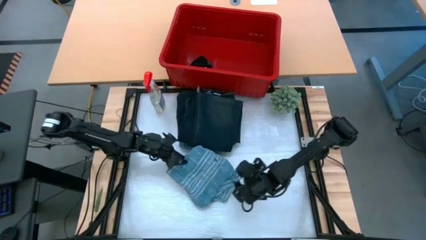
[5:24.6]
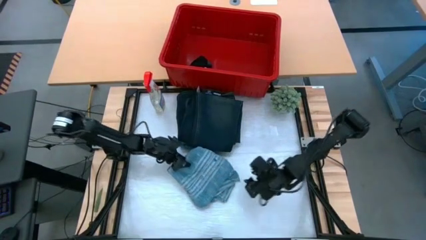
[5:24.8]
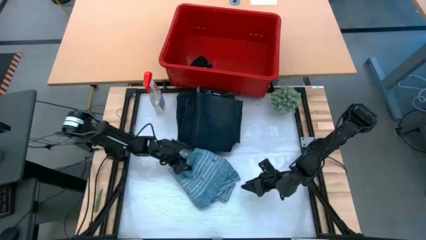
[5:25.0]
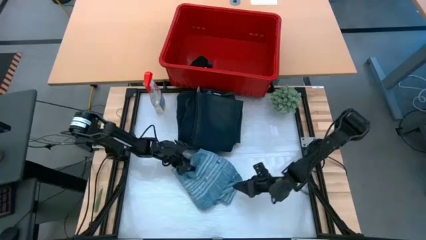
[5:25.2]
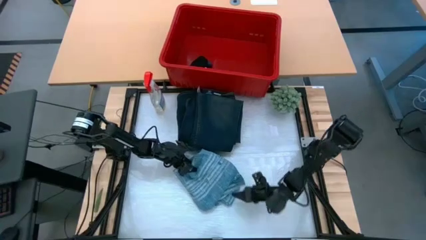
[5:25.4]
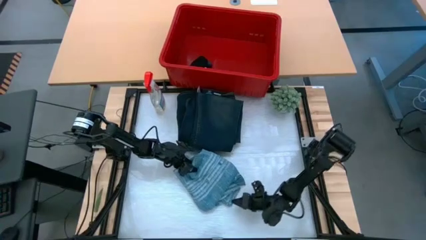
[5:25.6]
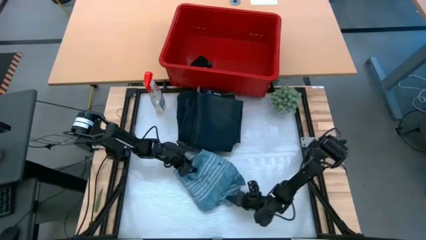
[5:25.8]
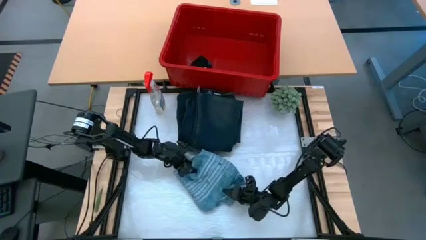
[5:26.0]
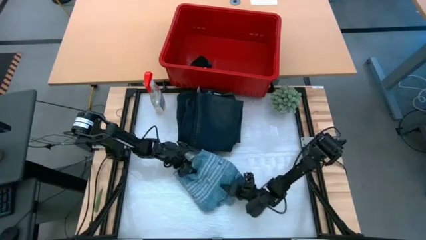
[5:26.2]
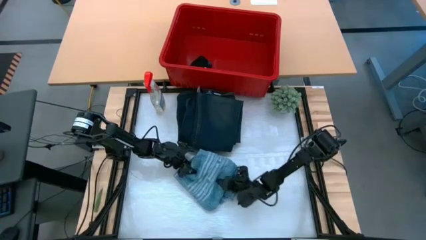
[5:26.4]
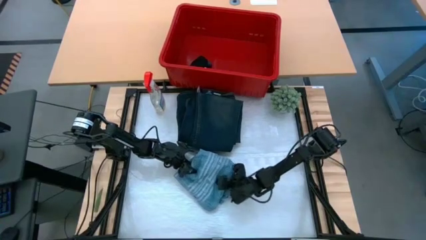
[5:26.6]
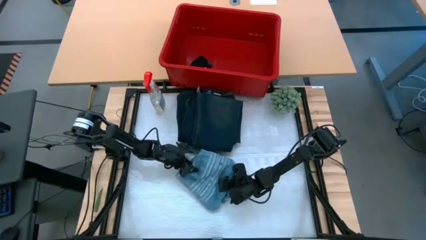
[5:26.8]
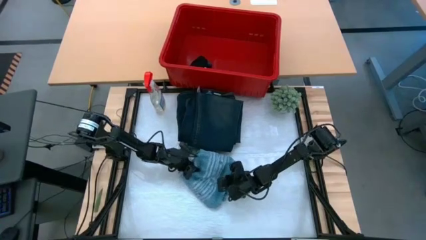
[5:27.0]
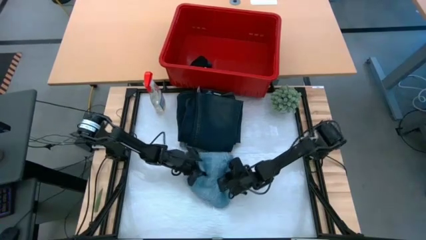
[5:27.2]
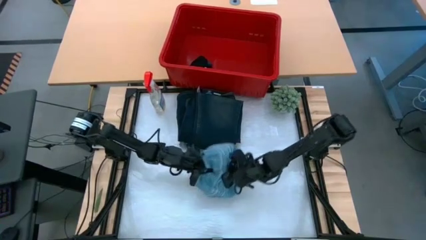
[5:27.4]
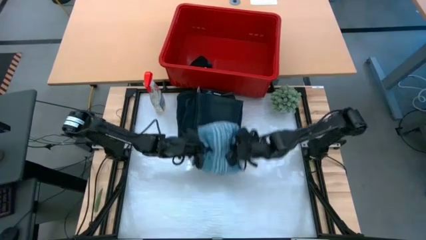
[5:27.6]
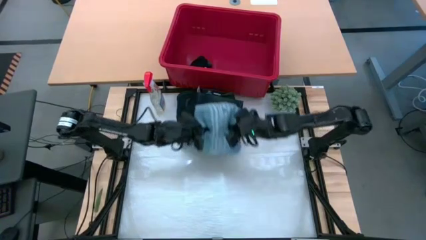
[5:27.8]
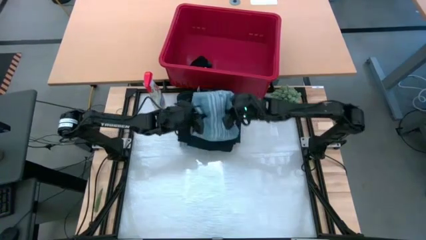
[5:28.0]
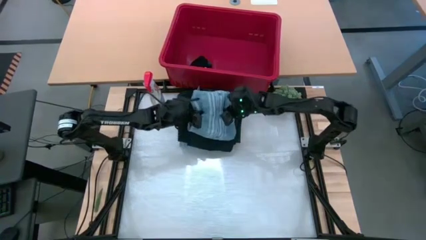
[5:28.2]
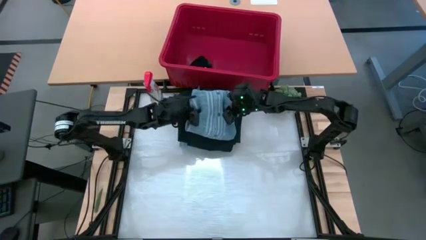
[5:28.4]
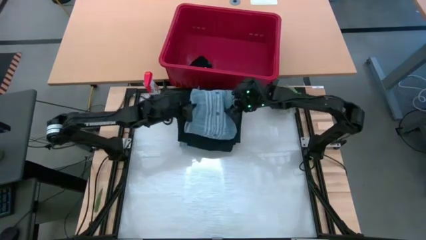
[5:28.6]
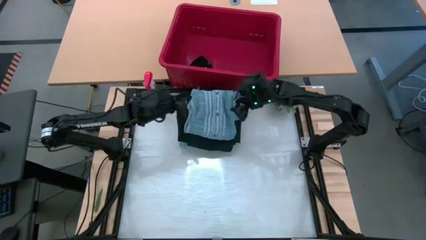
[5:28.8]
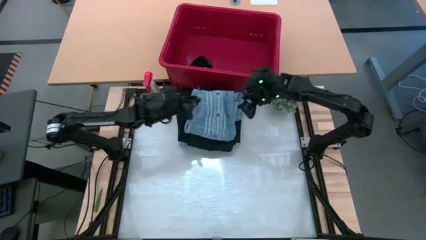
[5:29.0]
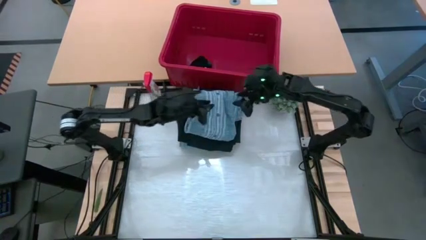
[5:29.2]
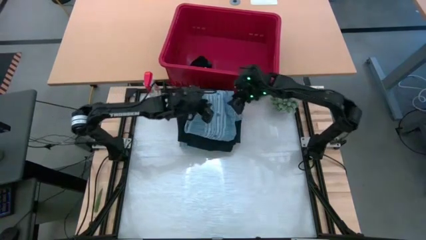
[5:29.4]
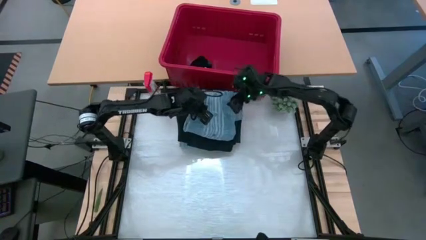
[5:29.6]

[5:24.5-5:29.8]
Task: Fold Laundry from Bin
Stack the blue long sleeve on top of the black jeans

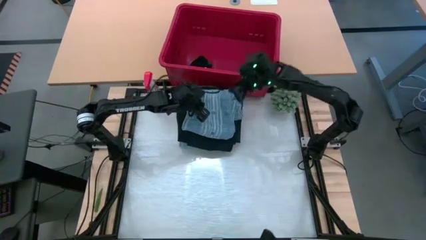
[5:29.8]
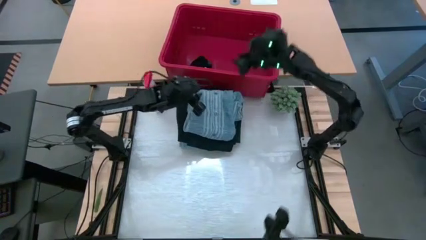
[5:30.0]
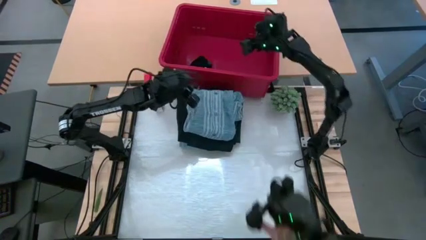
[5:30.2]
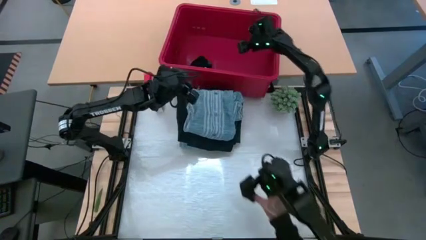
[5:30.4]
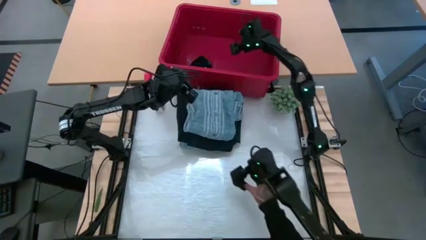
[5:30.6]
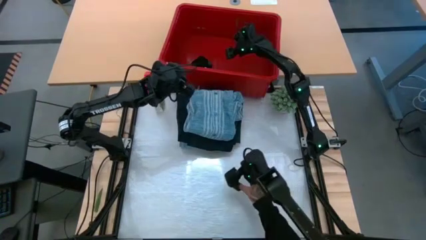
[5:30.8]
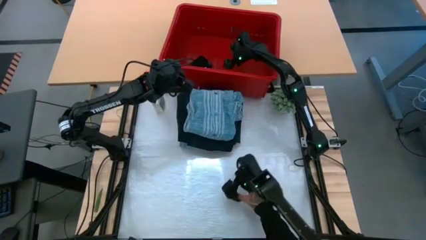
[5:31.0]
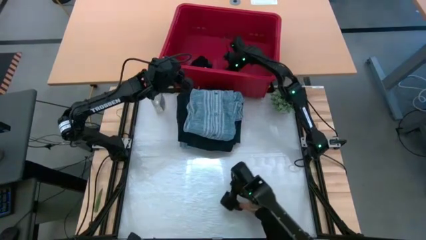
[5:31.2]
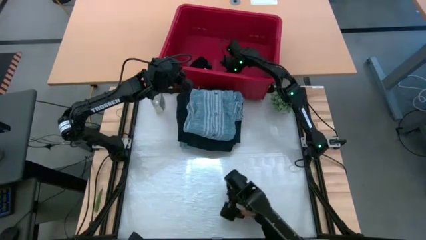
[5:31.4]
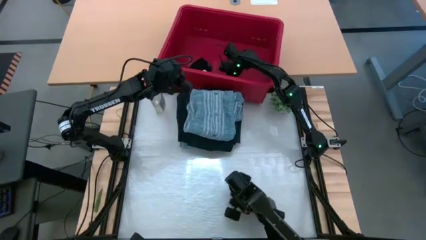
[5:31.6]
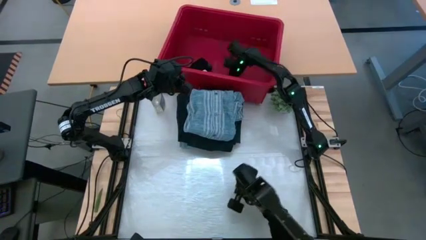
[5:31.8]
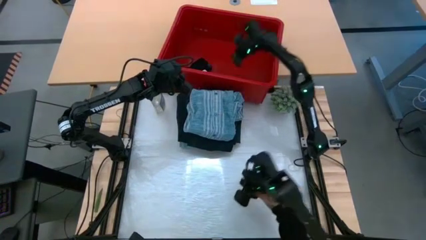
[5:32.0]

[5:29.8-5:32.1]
Fold the black underwear from the red laundry

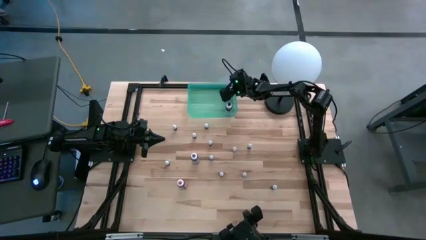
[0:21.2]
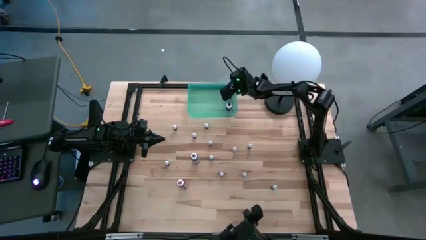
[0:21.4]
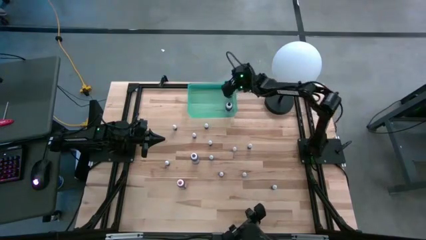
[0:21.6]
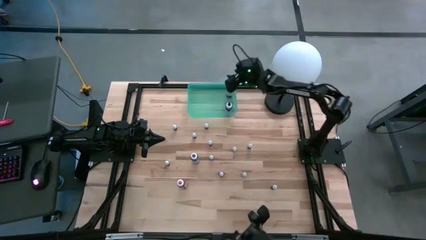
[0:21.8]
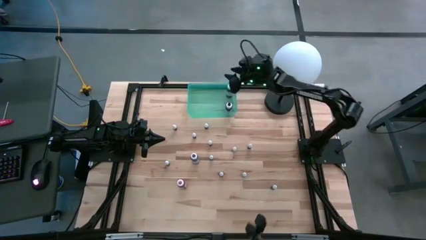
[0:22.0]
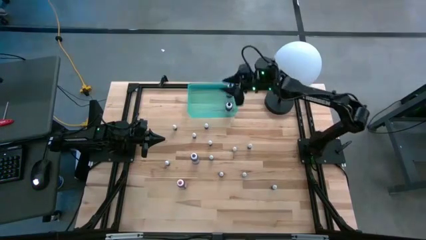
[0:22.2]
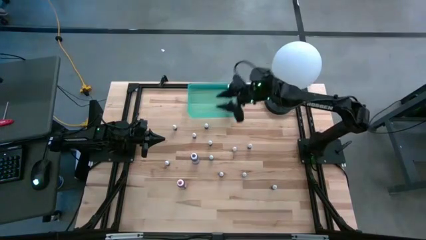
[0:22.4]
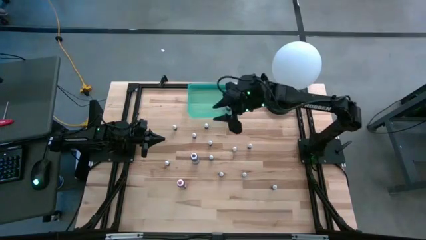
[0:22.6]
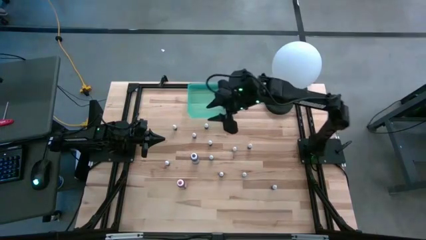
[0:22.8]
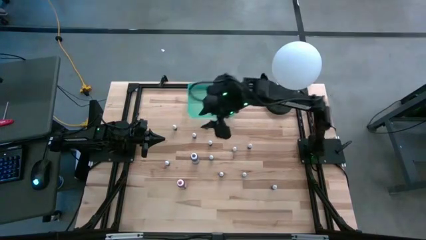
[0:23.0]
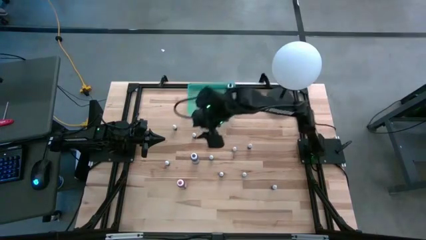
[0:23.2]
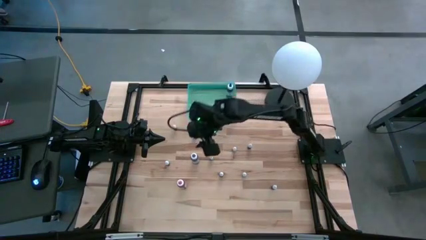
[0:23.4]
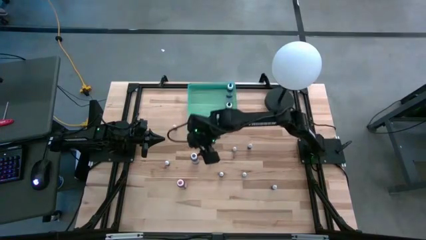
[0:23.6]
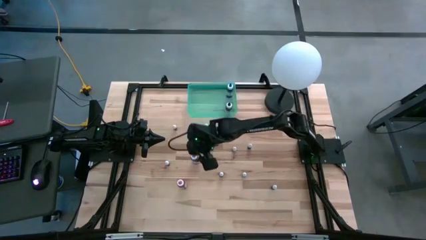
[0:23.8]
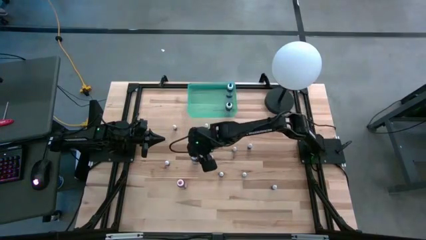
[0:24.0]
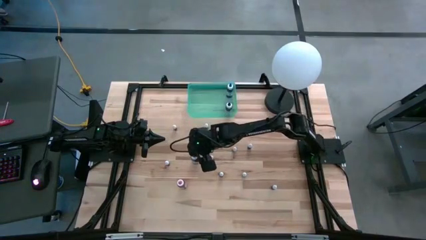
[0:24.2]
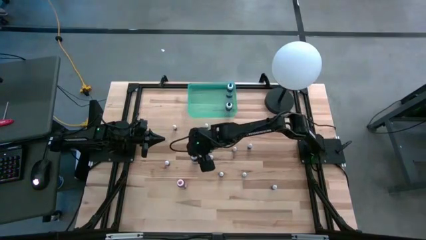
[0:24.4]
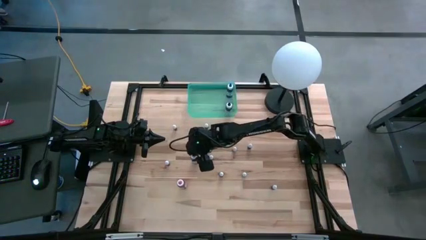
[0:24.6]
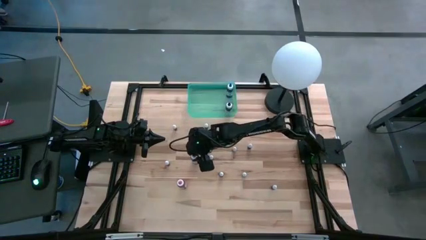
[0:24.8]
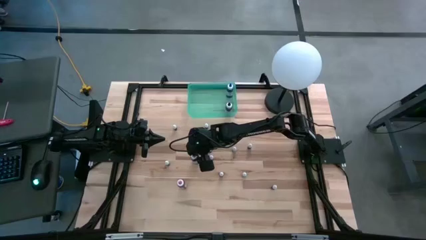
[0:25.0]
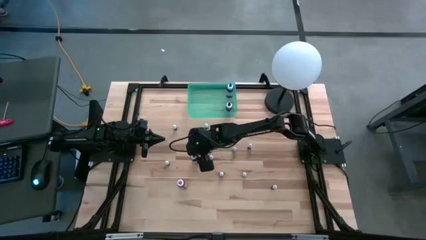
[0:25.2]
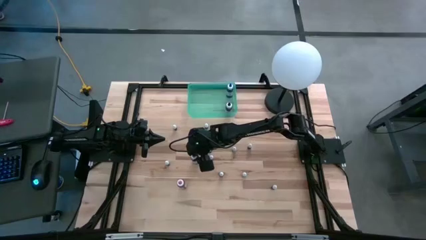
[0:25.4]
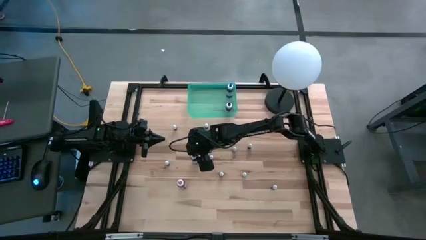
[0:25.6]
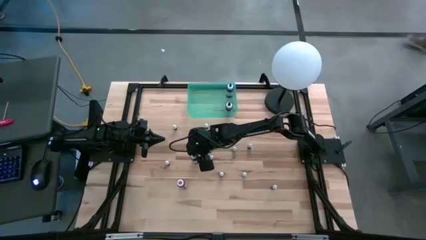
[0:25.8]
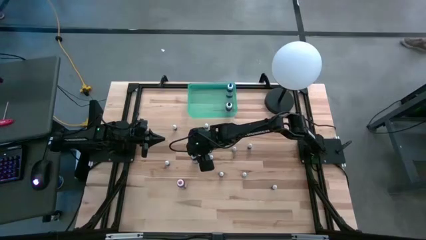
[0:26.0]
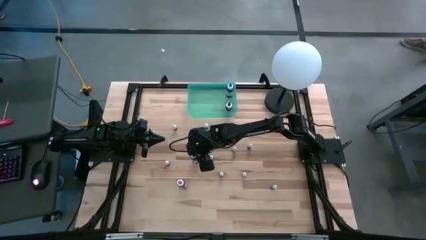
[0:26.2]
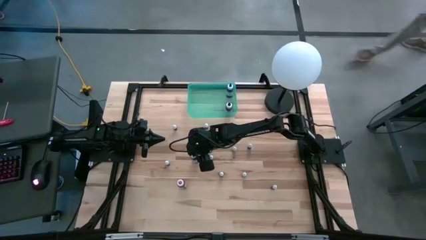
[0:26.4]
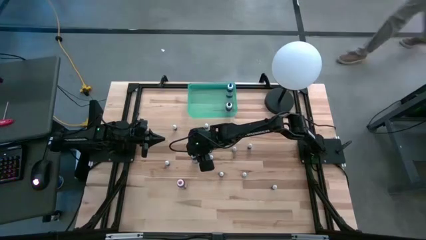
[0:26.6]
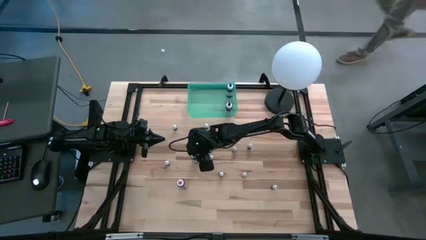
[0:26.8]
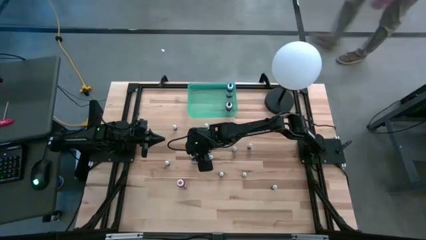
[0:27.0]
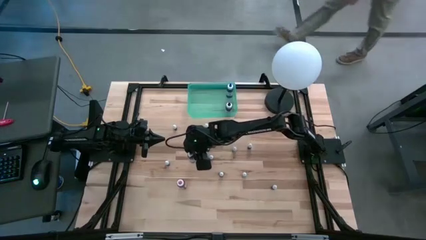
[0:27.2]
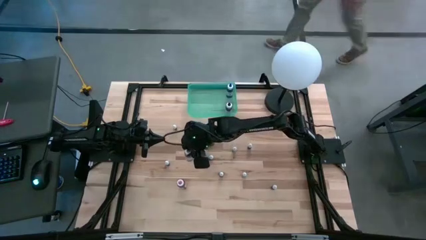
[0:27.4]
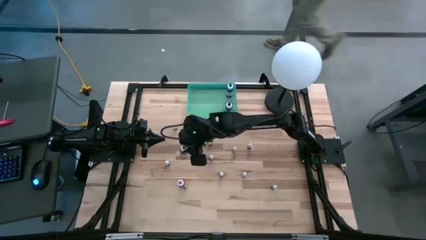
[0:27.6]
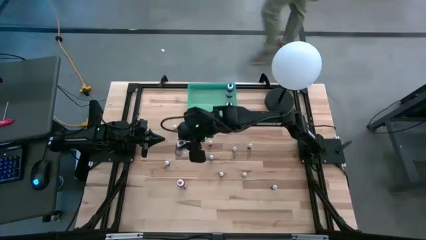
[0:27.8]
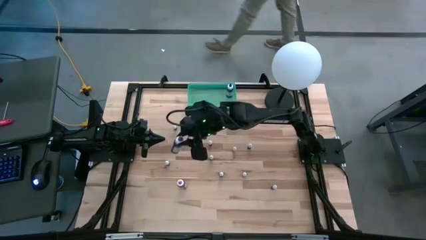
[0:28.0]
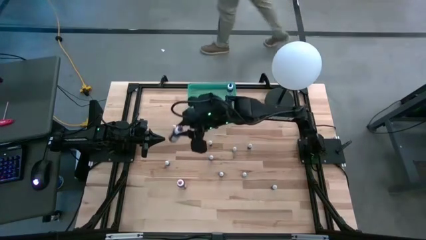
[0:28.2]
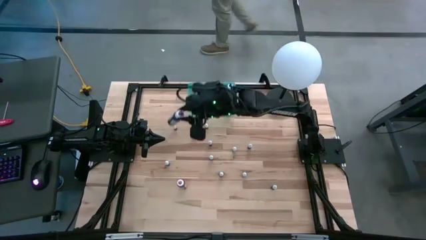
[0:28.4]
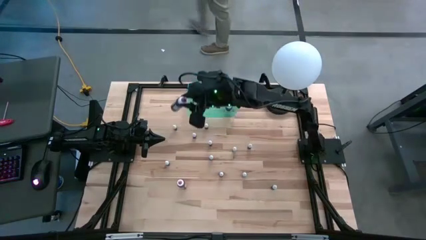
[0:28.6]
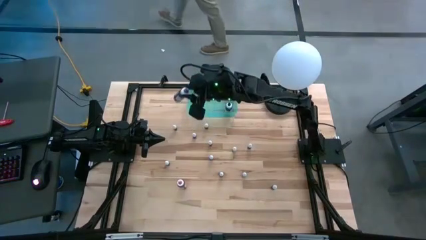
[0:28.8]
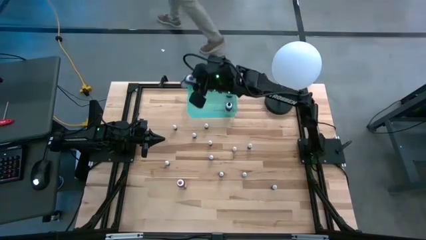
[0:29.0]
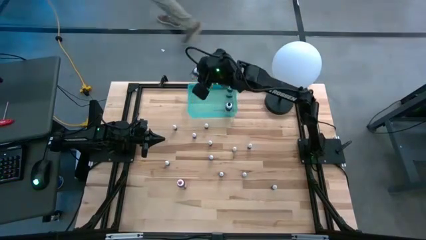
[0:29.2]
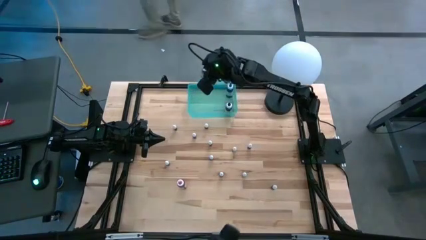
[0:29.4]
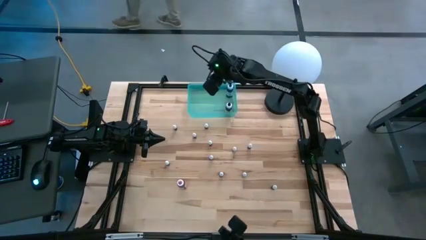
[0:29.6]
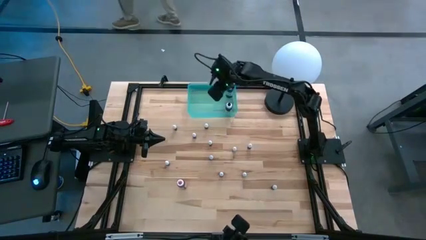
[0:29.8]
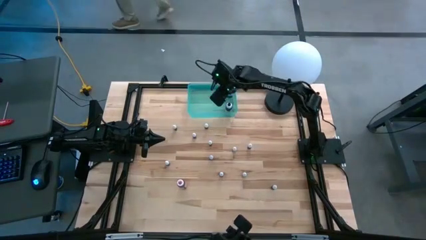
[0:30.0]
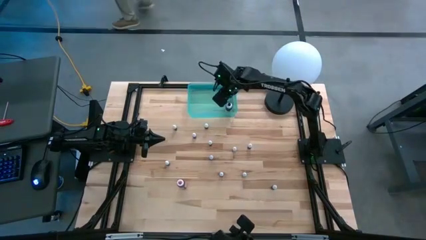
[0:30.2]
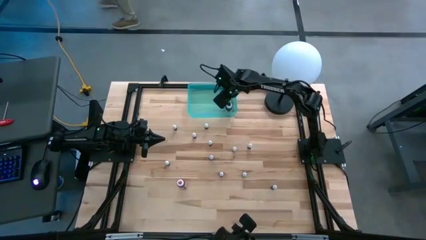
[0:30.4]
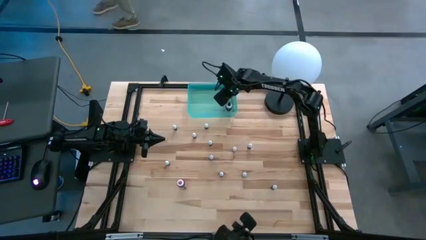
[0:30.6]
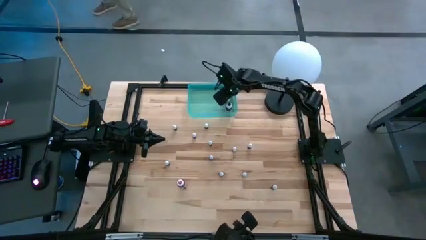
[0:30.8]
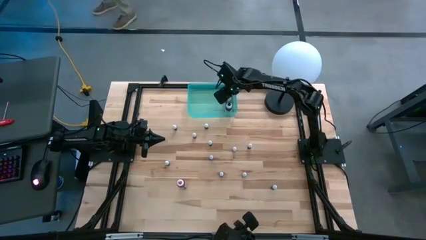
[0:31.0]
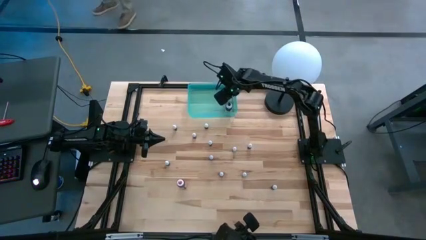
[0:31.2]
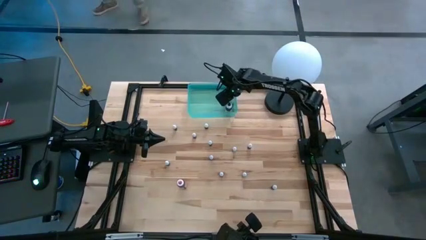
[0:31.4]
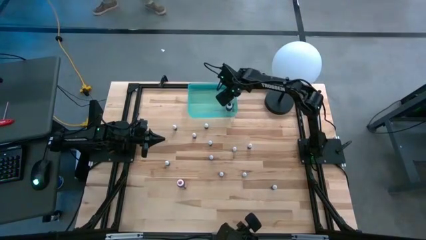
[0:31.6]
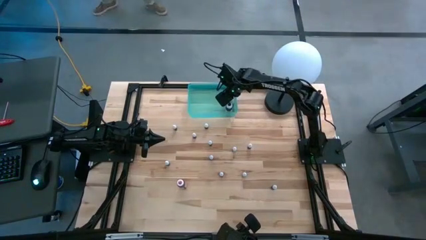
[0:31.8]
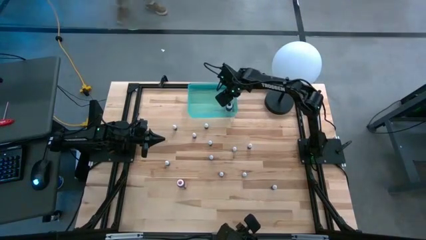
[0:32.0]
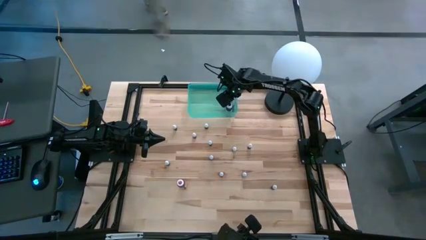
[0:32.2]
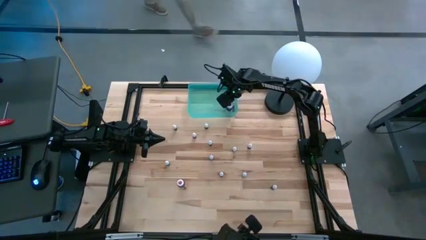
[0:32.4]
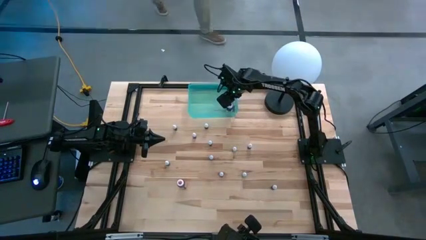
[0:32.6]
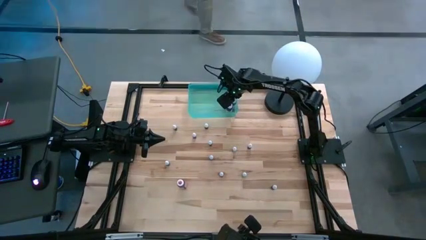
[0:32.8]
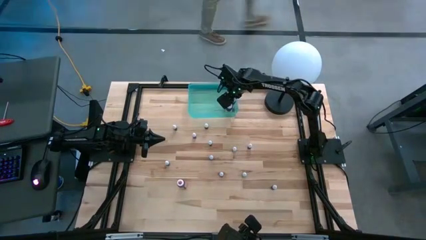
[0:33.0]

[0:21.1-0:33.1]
Task: Pick & Place food coloring
Put the large purple food coloring into the bin
